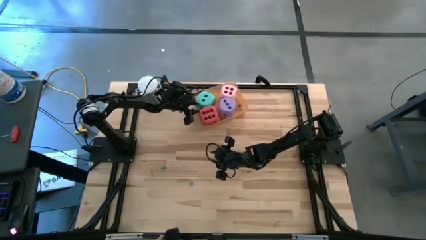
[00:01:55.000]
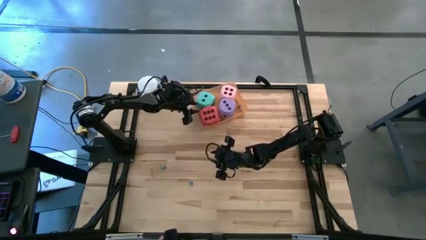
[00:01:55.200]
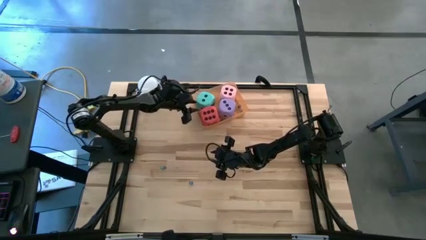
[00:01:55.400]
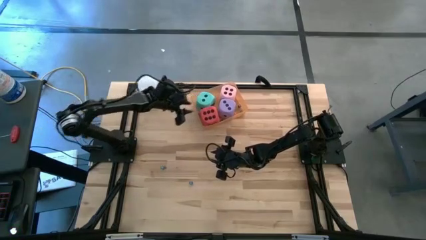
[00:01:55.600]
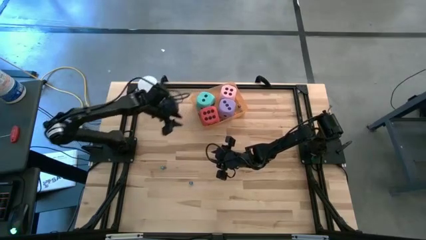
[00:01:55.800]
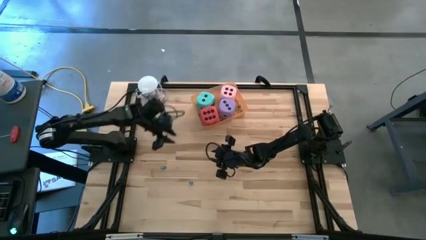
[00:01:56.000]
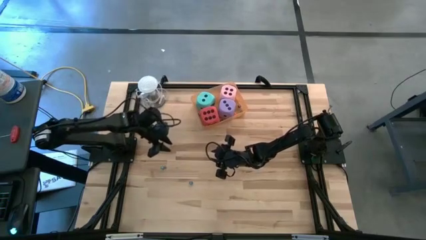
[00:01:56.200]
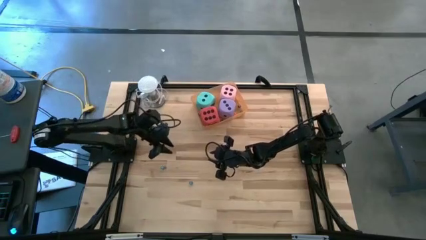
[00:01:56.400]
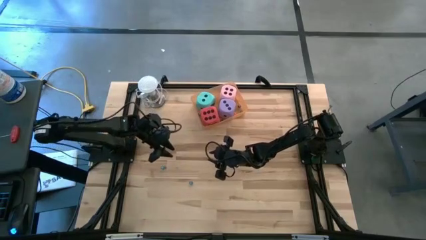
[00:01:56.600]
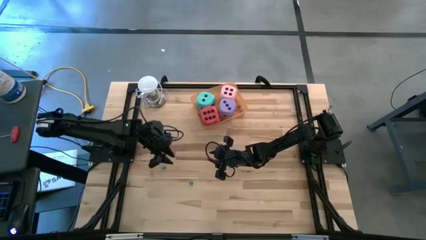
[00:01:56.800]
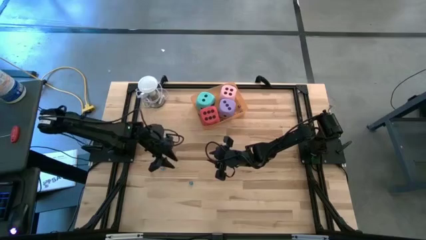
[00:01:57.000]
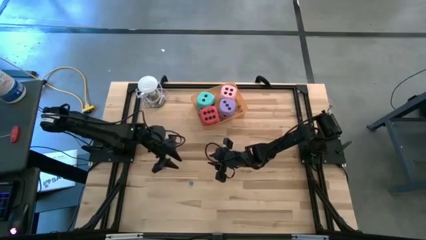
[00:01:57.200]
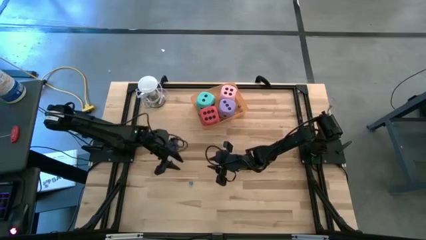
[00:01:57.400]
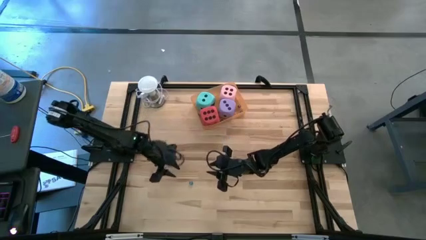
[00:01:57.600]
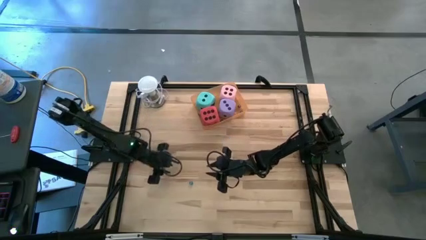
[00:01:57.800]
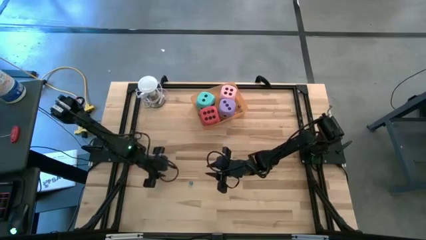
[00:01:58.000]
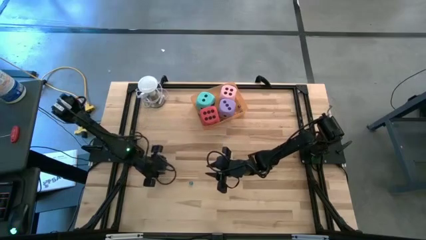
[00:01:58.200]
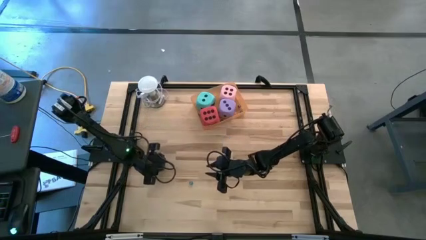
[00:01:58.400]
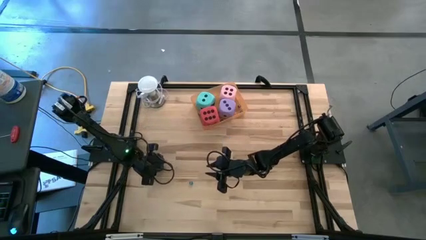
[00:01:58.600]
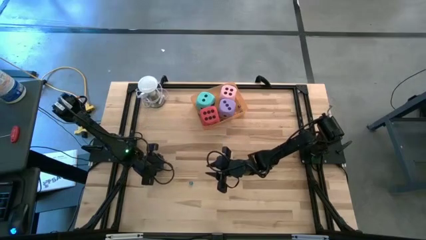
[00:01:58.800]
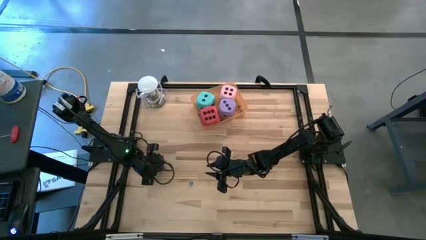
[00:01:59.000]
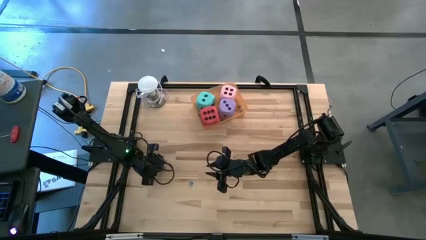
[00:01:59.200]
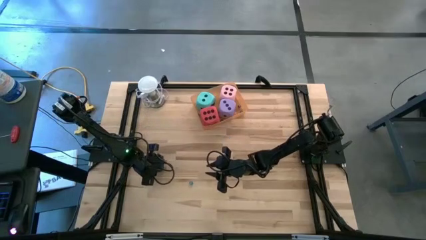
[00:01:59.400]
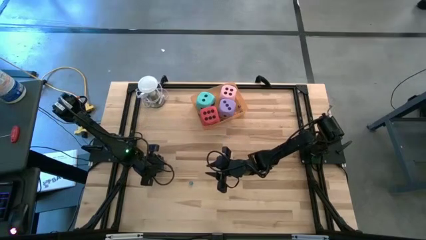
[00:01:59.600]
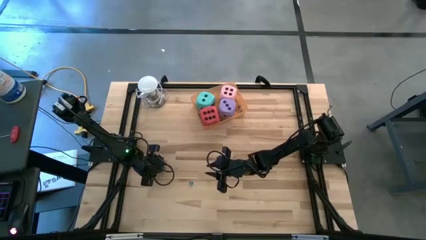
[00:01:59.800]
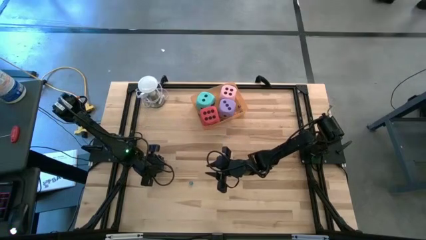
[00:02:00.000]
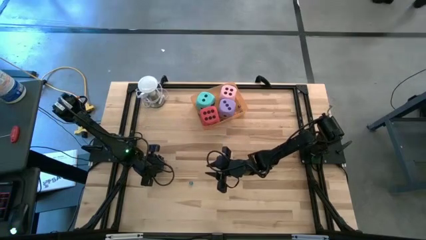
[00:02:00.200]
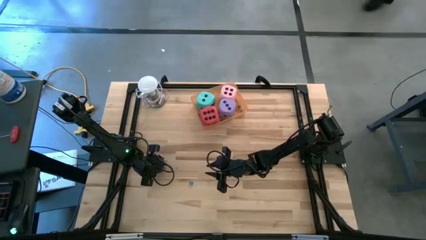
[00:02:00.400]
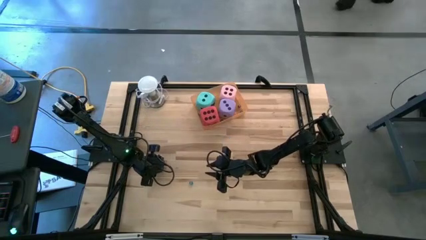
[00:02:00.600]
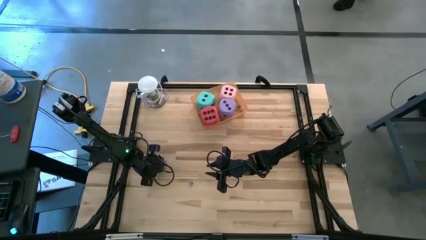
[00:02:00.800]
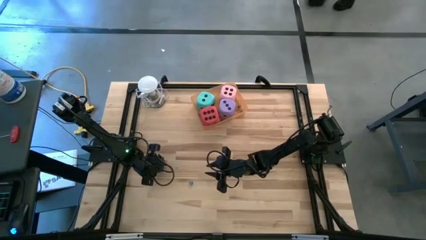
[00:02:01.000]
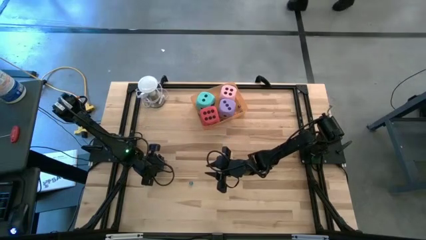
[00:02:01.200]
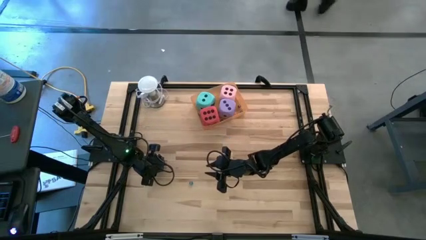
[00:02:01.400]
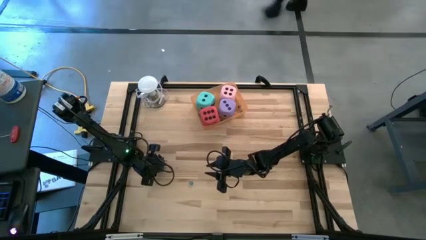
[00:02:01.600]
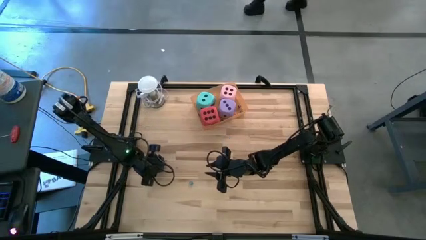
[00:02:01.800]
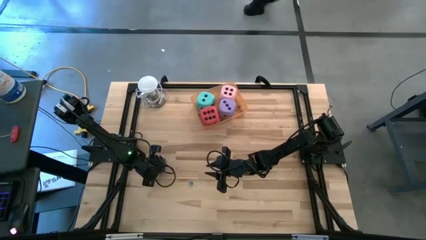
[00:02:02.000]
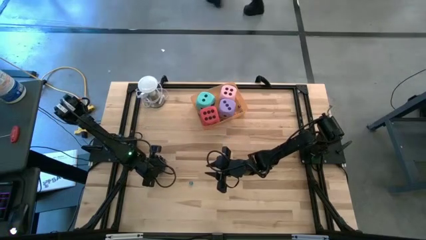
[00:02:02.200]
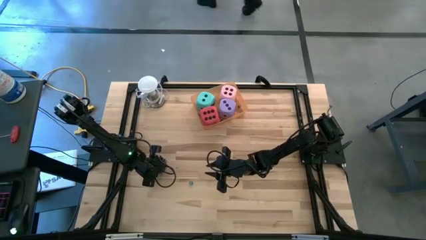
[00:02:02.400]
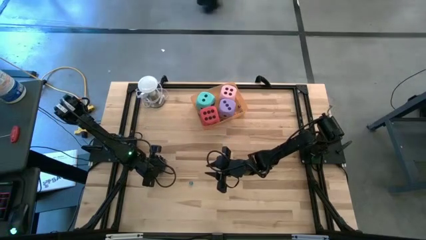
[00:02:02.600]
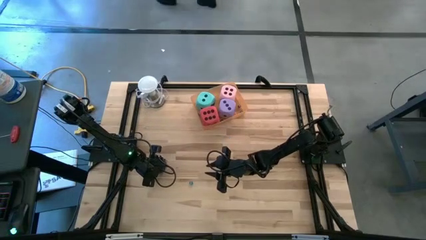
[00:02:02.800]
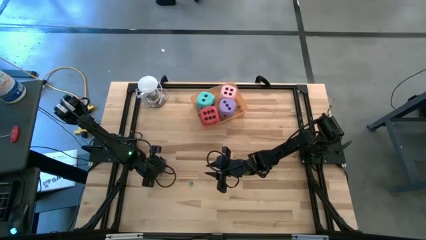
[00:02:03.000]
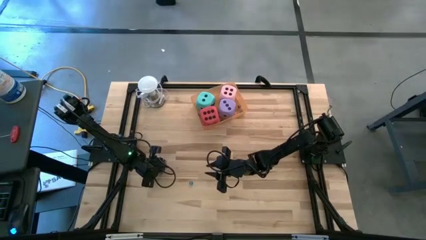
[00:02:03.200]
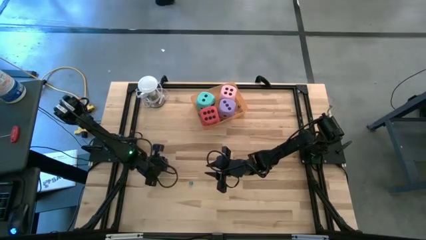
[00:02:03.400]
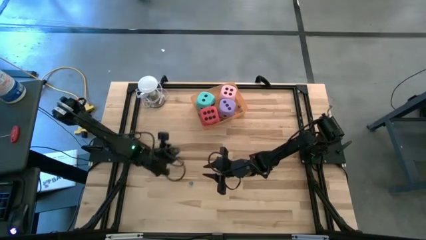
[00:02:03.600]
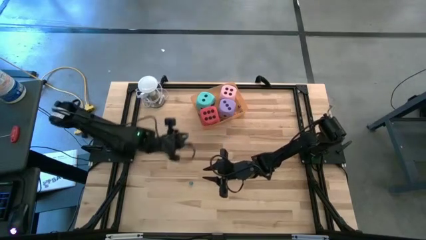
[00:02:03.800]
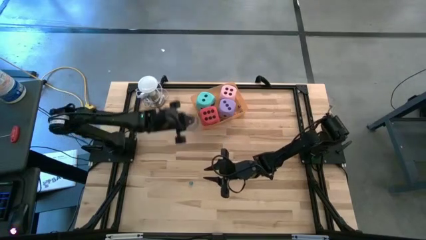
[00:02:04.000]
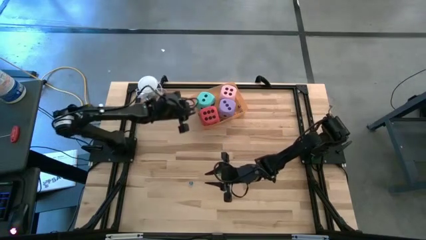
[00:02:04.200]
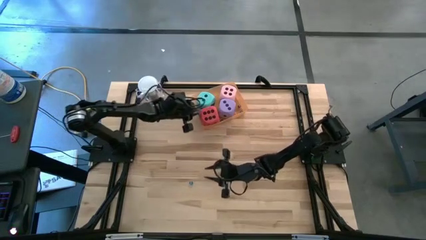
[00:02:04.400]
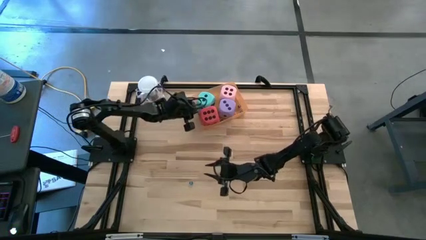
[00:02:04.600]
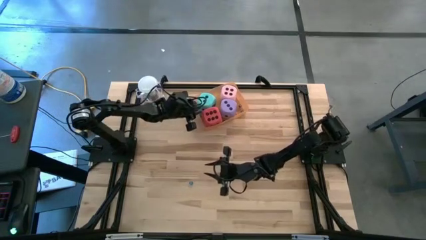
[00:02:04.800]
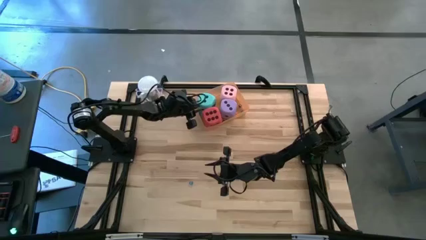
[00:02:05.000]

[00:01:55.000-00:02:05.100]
Task: Pick & Place Dice
Put the left light blue die into the bin

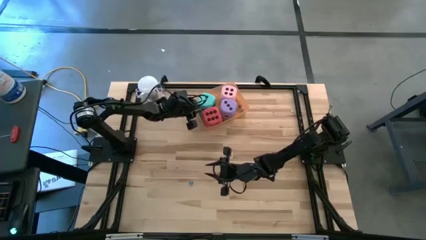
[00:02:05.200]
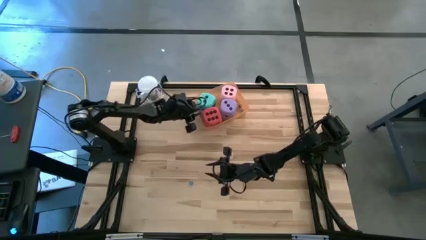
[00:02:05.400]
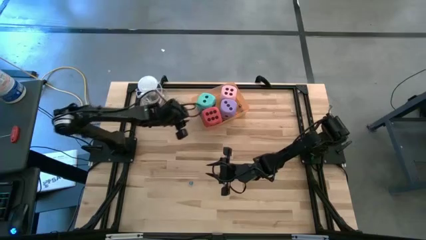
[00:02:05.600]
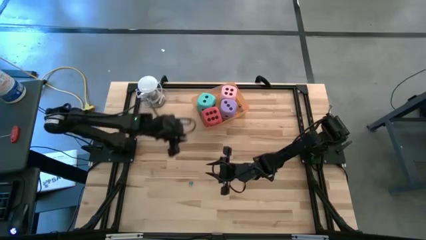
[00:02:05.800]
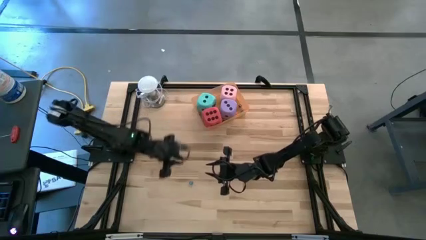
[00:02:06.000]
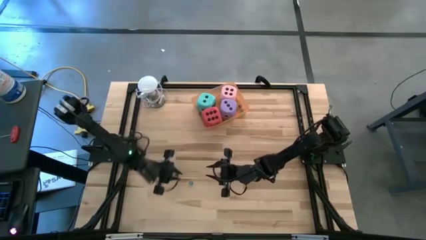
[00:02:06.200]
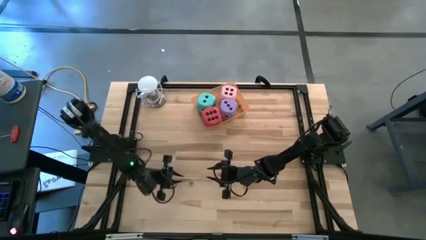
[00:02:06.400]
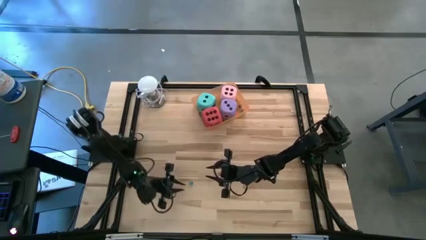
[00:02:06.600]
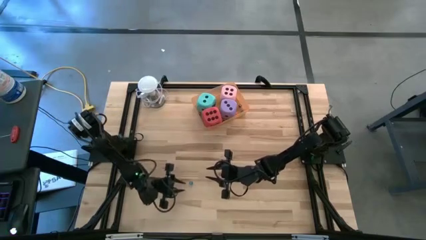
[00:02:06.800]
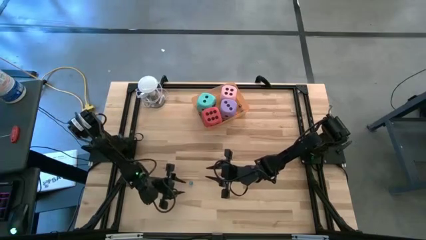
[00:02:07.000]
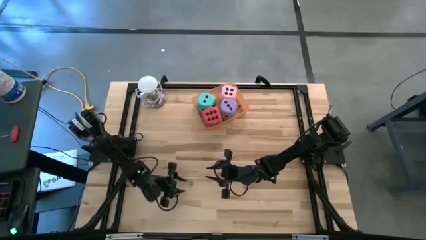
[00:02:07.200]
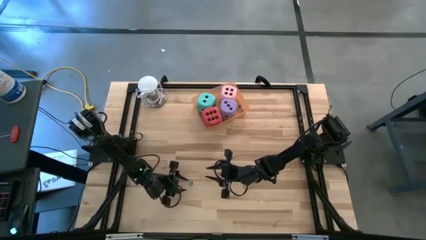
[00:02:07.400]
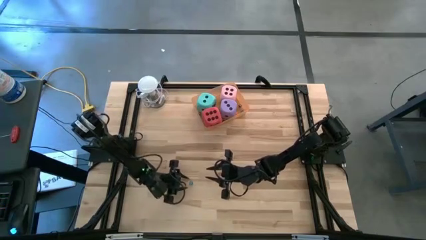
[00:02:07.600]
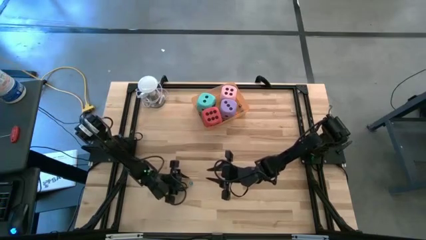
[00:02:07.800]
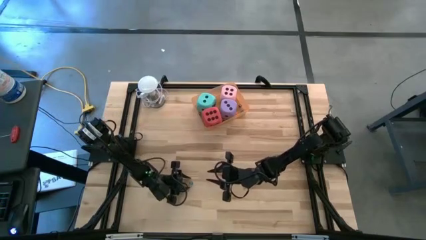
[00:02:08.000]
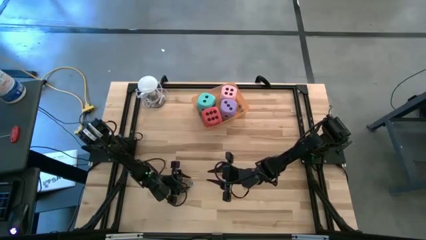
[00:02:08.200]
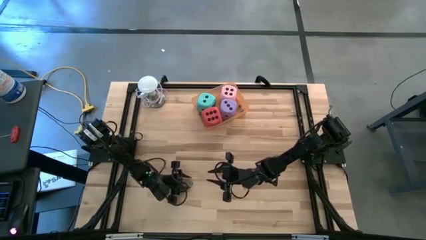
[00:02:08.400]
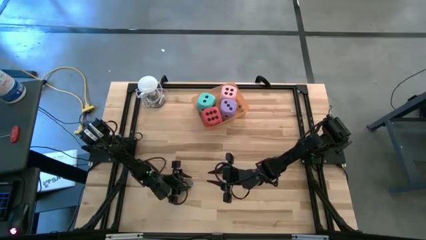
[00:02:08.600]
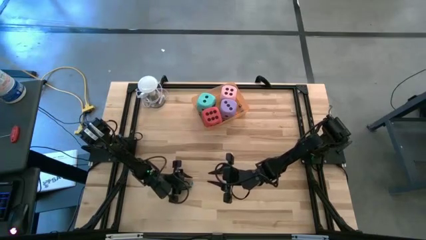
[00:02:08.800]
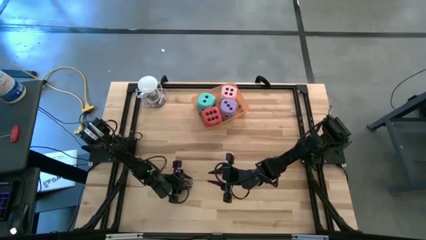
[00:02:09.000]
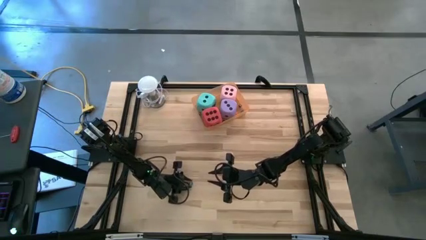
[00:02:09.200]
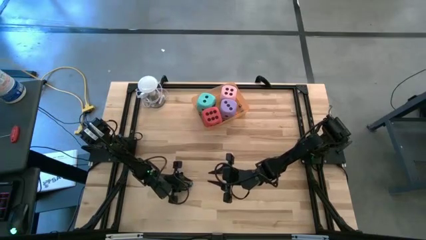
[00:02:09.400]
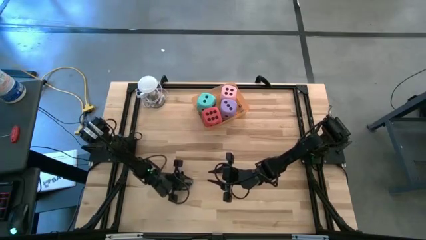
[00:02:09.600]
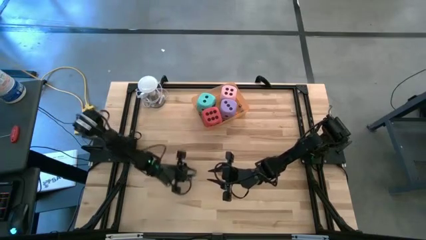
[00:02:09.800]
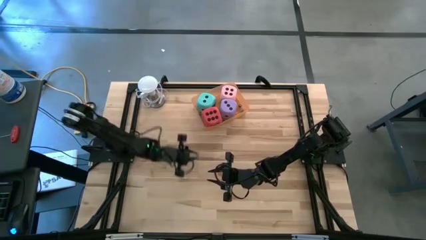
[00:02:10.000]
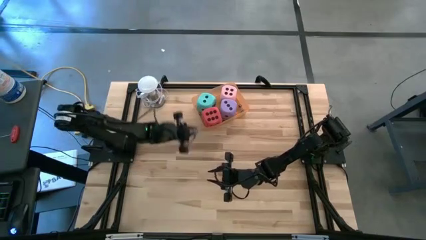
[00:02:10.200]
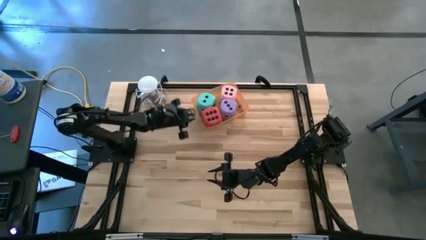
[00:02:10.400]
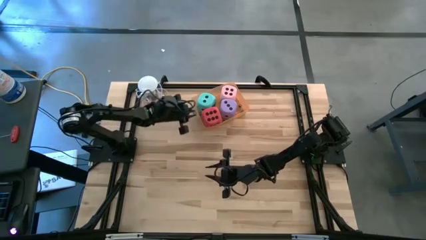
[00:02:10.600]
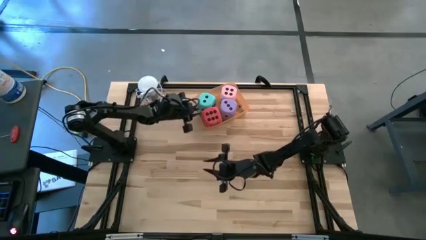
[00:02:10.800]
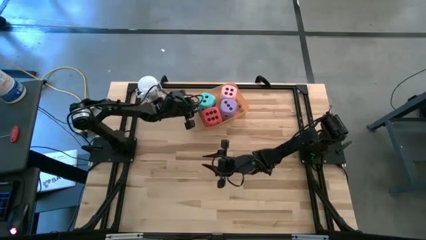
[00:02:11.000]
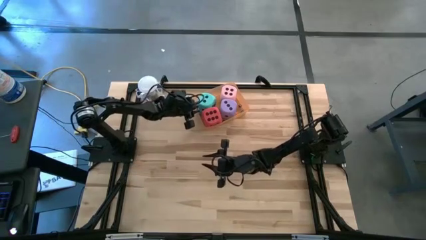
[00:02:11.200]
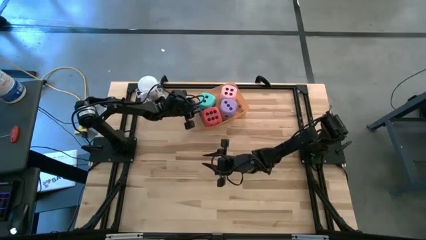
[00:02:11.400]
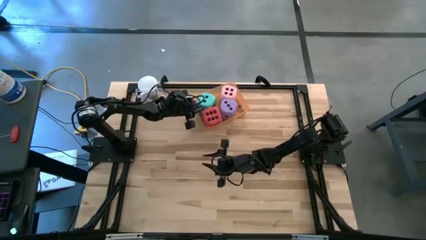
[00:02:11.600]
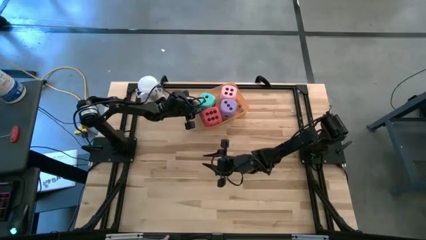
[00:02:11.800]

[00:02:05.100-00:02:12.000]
Put the light blue die into the bin
